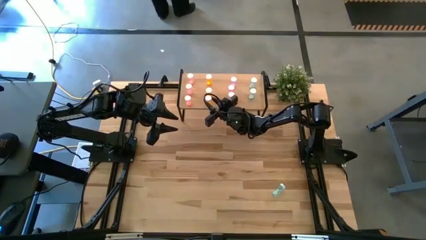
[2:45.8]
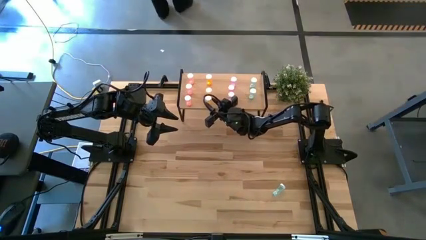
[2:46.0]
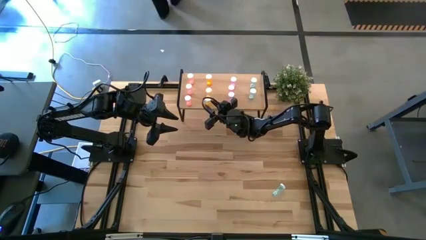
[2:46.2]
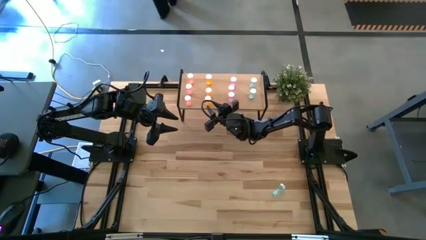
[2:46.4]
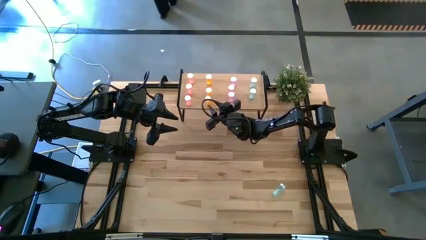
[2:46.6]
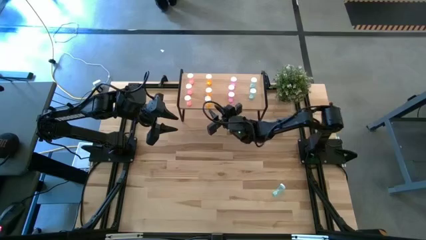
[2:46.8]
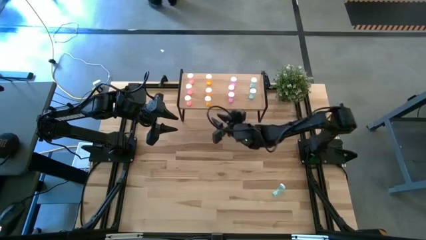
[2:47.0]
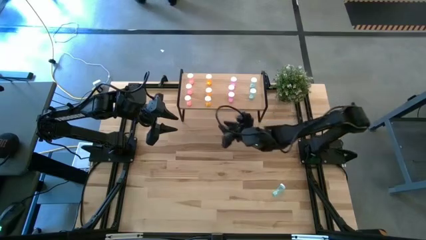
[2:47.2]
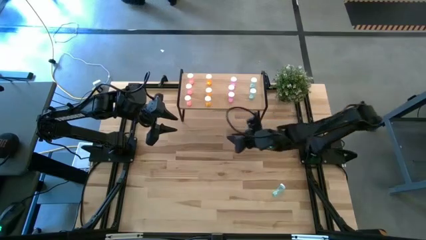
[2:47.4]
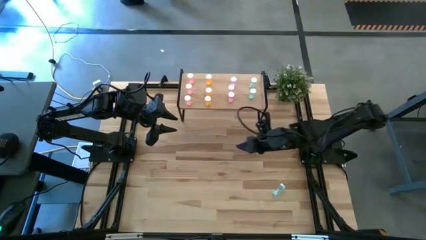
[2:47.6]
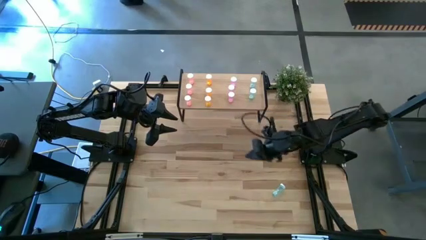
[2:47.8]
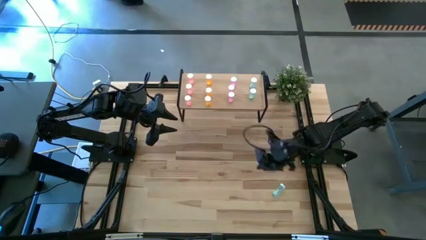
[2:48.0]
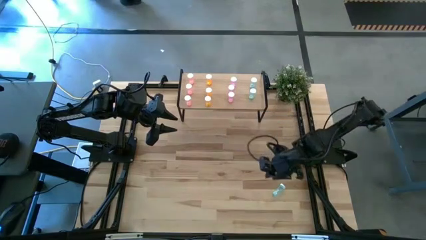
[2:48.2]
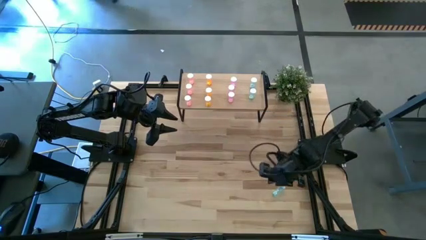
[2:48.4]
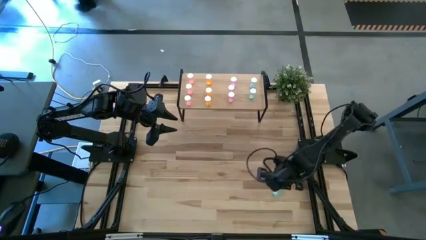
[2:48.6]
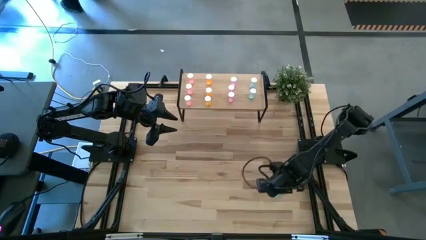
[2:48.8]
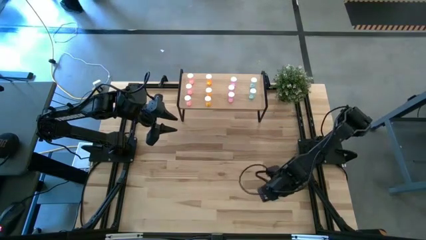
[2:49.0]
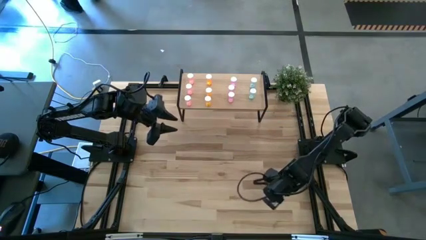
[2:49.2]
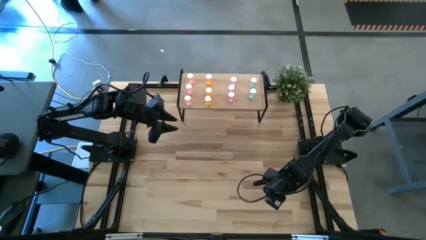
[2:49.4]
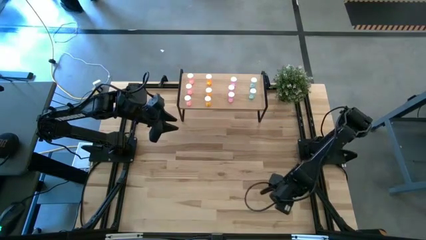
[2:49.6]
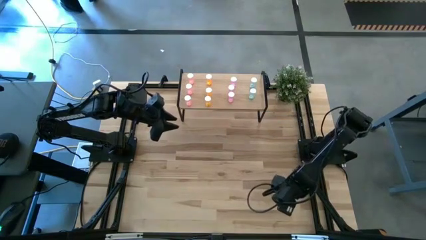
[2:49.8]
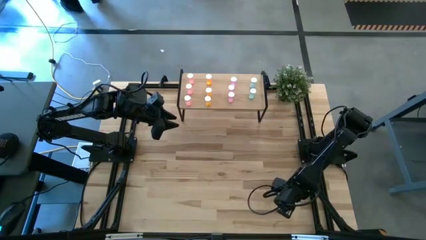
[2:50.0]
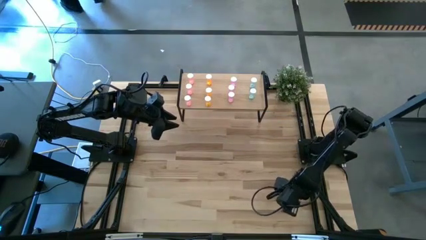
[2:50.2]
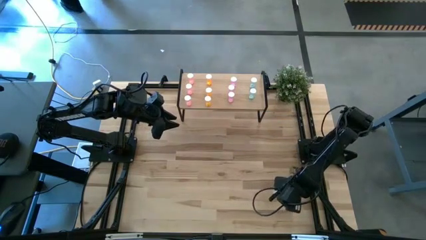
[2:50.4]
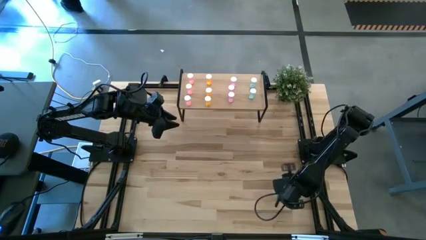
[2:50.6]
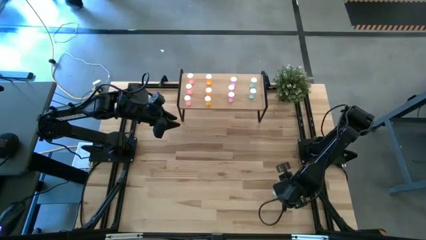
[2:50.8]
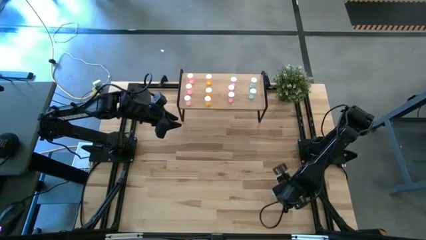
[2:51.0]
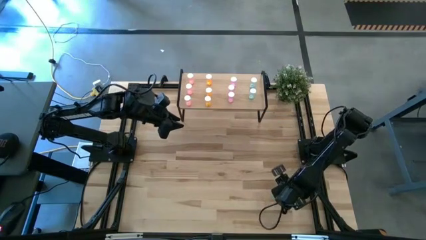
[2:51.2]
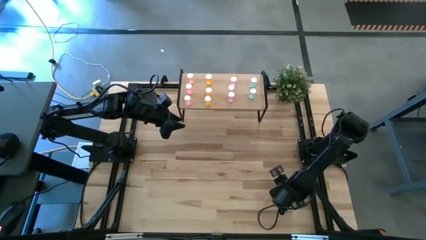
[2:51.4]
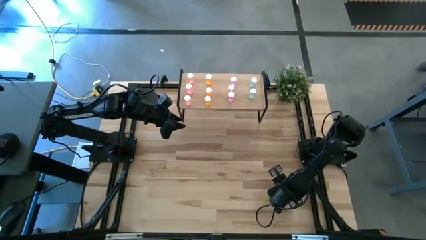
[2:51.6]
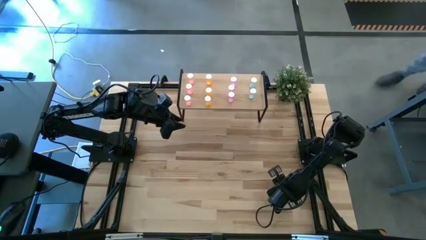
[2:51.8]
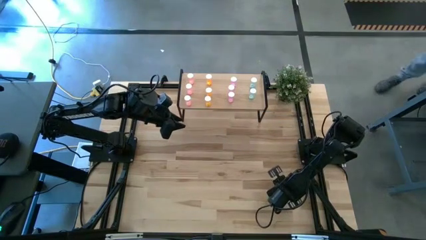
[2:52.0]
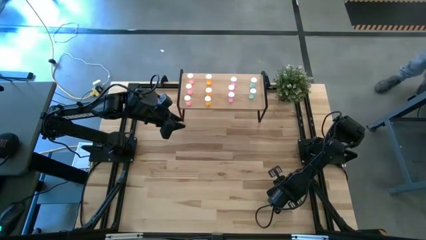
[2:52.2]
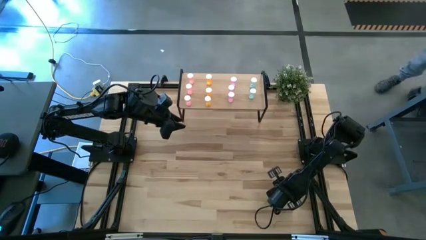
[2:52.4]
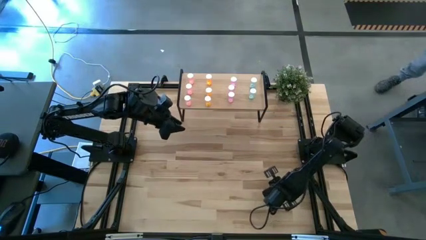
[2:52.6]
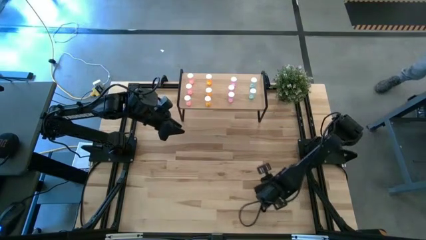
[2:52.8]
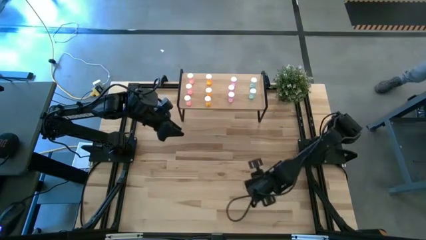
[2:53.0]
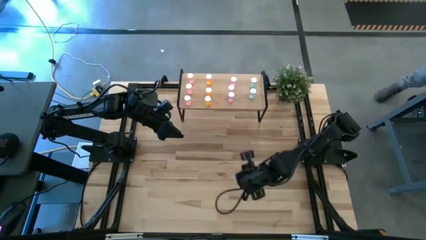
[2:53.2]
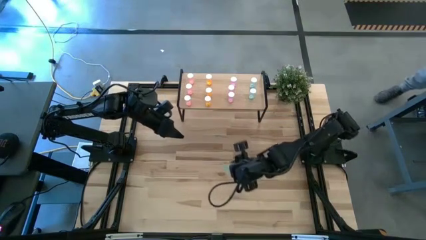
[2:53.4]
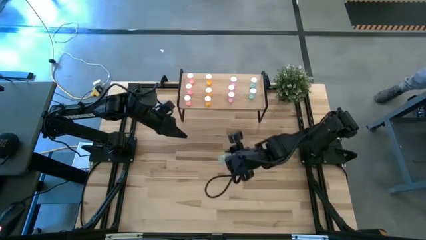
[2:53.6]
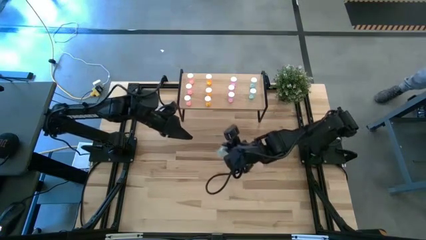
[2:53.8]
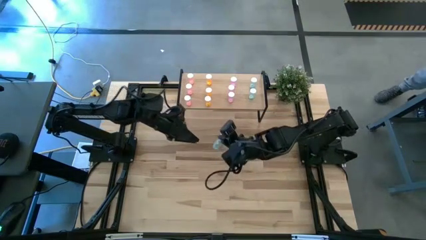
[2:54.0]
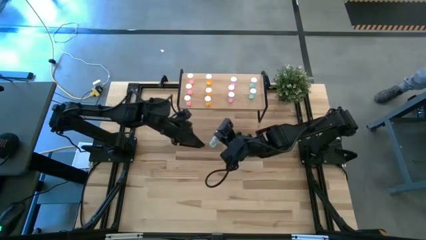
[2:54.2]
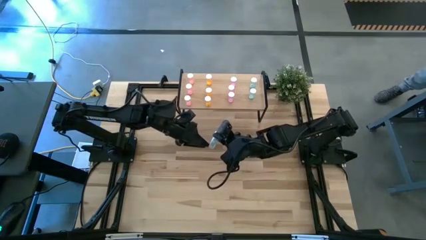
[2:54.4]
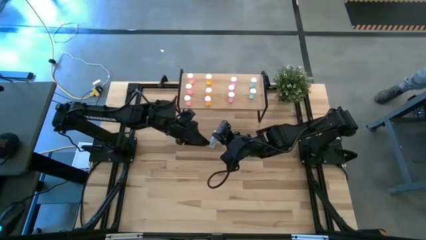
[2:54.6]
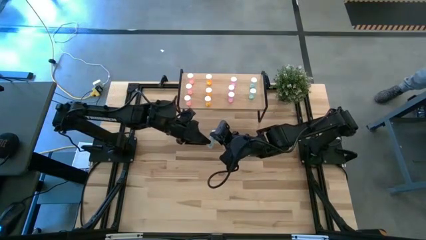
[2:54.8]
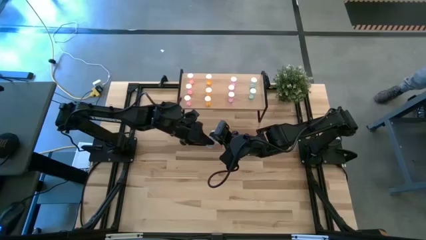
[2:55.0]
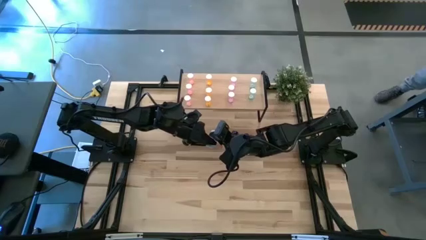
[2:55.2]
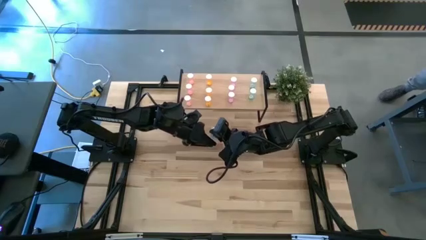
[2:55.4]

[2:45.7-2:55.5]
Task: Pick and place medicine bottles onto shelf by color
Put the blue pill bottle on the shelf aligned with the other blue pill bottles

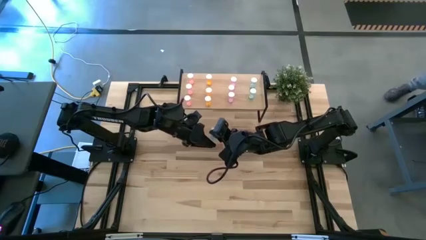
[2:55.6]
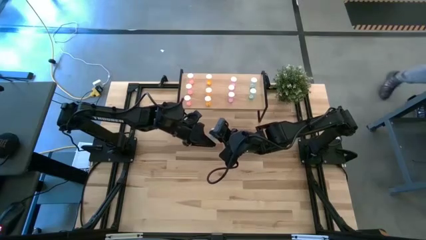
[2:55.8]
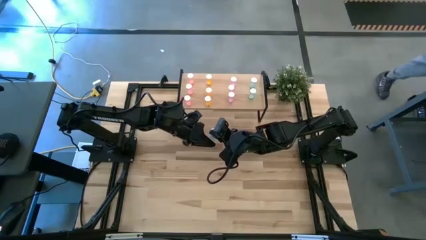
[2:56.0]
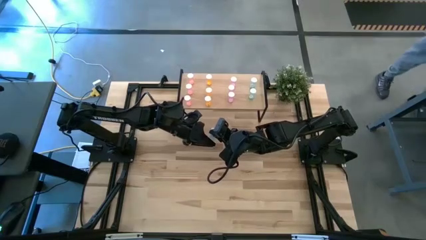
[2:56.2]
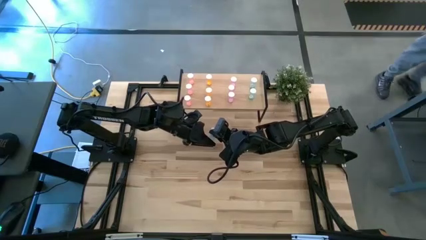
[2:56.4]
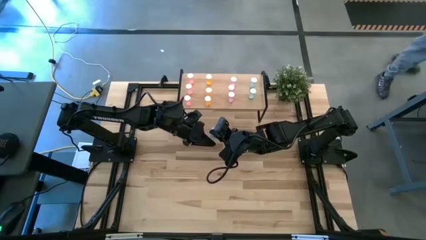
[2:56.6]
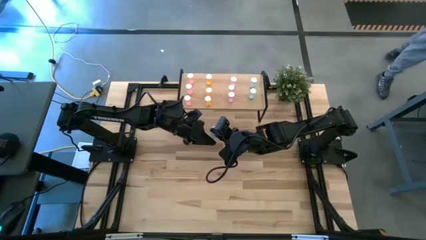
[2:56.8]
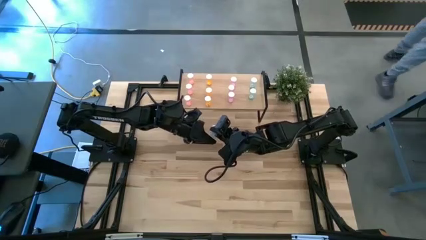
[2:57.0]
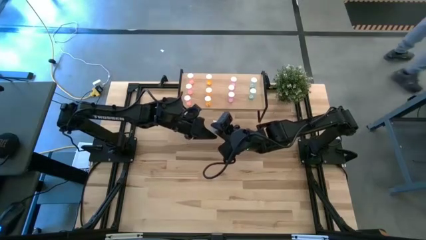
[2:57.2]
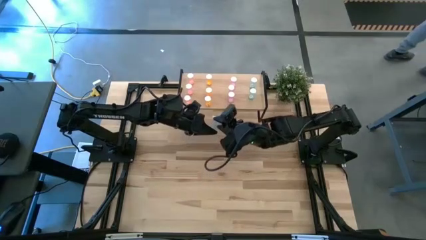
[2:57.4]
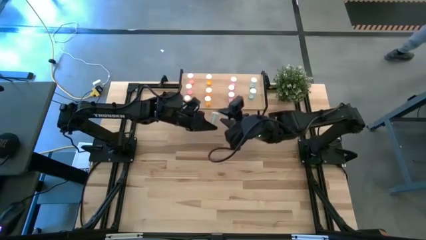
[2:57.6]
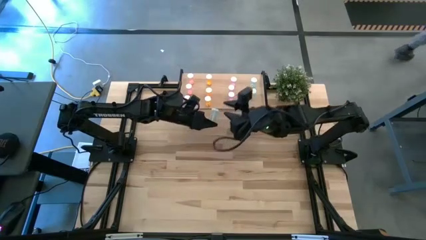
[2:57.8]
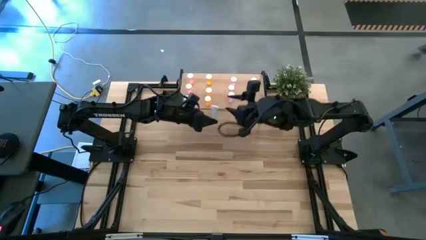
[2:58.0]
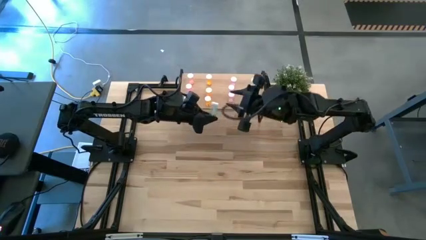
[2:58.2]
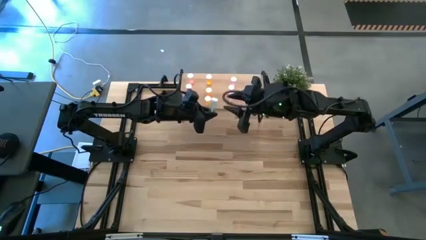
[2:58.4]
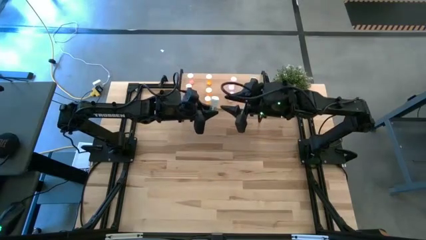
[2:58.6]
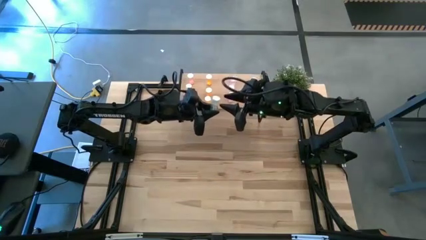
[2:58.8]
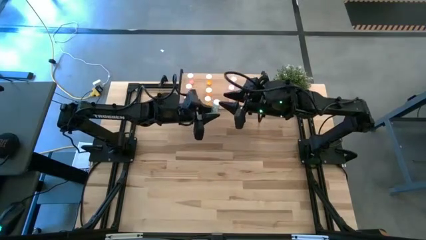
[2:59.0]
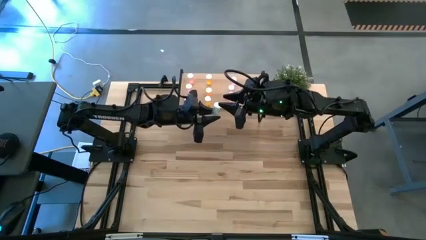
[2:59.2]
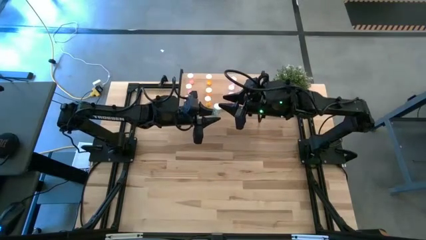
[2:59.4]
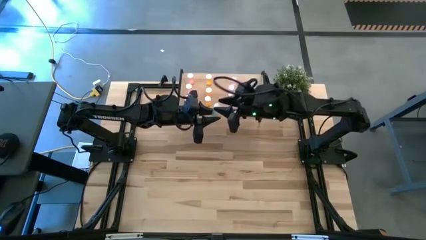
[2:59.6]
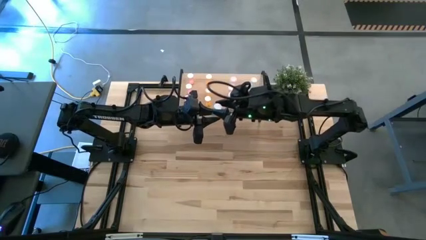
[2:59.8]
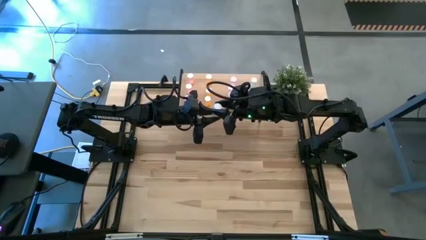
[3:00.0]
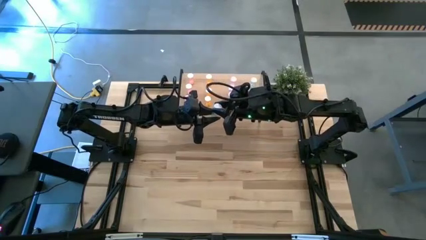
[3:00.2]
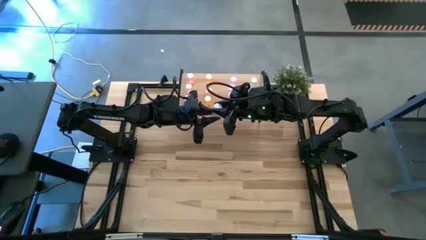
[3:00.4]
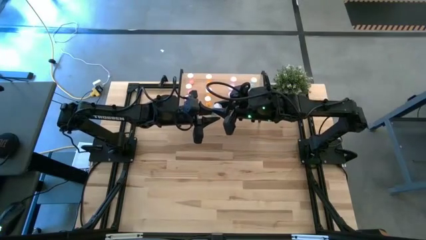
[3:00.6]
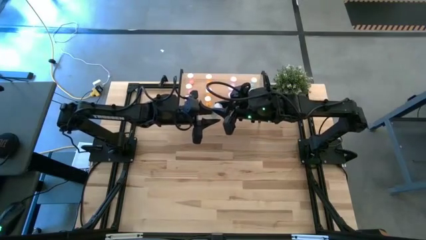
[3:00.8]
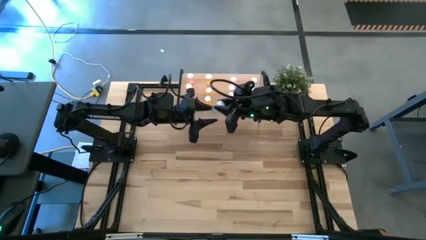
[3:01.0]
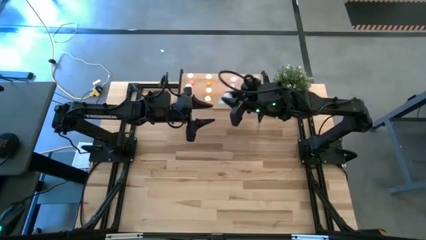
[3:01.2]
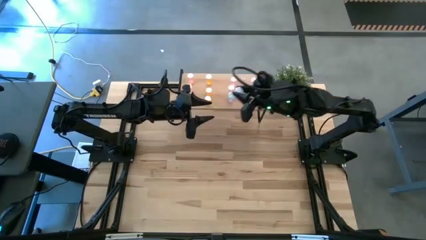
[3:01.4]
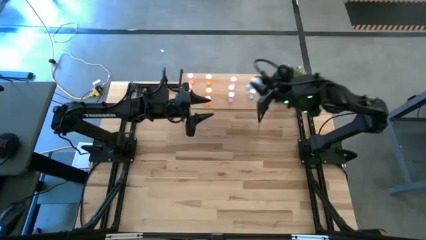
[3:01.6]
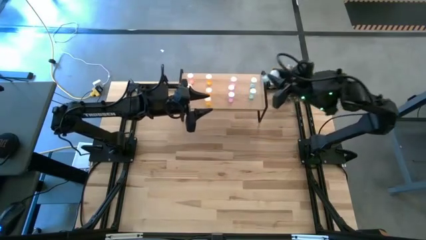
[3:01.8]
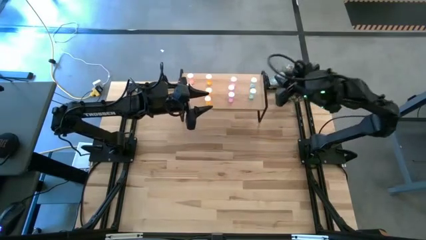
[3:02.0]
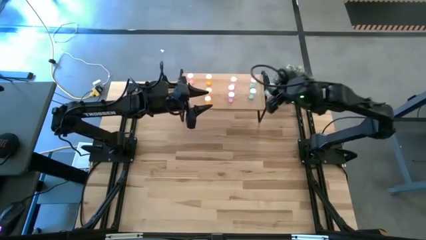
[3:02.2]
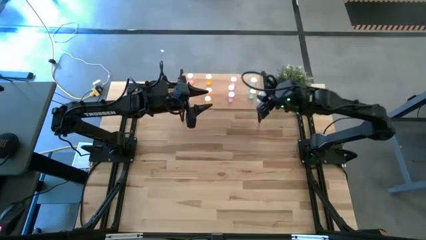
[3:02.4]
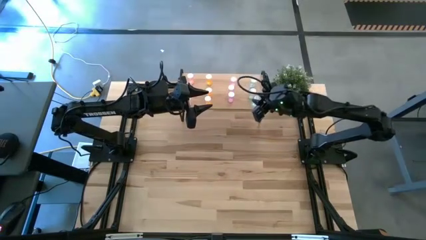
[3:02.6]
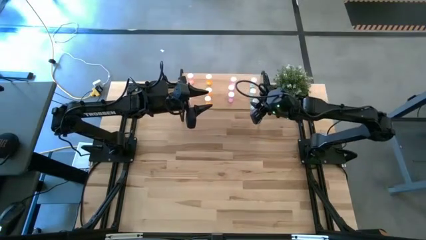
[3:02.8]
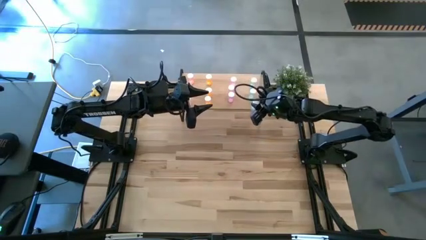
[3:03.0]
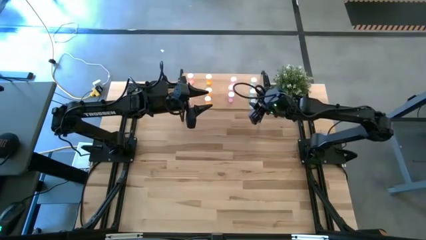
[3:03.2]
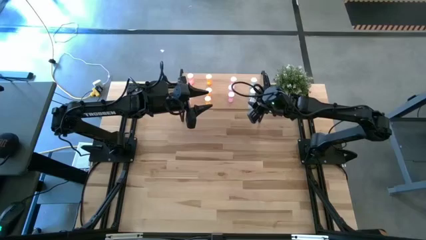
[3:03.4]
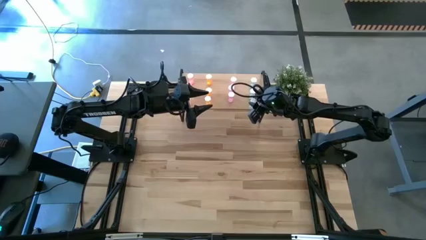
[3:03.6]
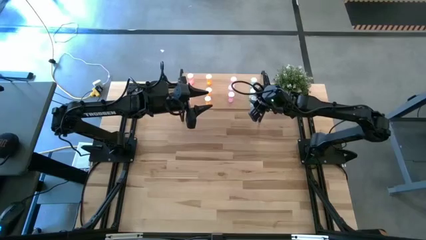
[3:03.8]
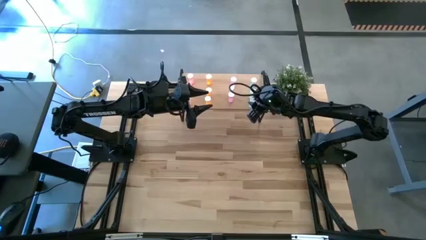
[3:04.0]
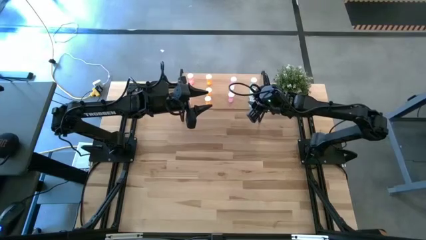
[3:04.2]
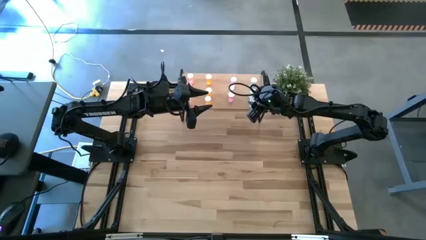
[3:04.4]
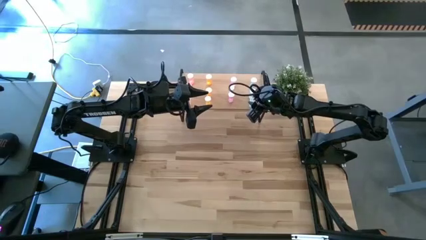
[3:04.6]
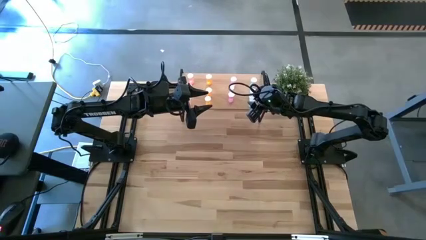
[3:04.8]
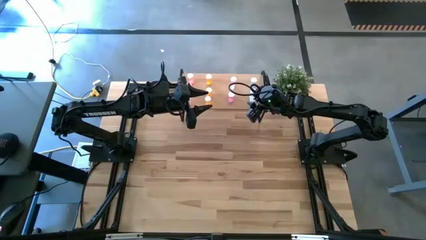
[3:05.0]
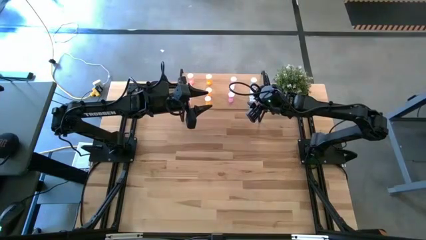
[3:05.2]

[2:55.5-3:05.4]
Put the blue pill bottle on the shelf aligned with the other blue pill bottles
